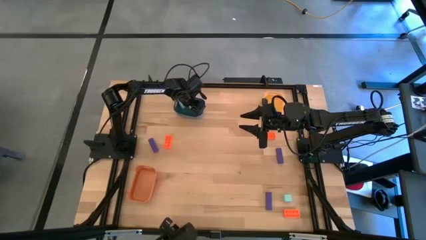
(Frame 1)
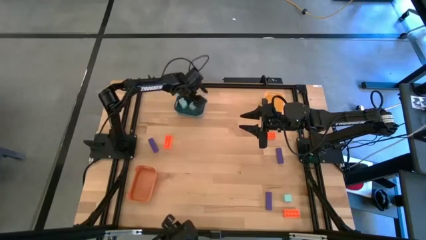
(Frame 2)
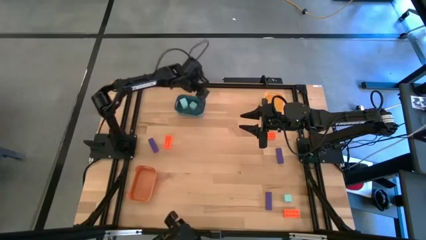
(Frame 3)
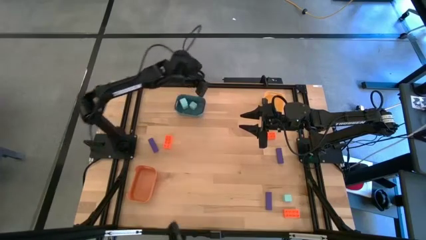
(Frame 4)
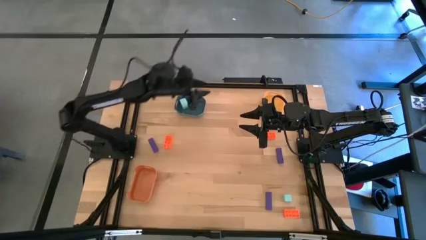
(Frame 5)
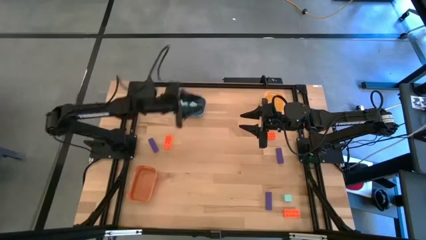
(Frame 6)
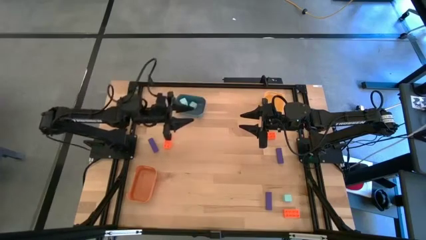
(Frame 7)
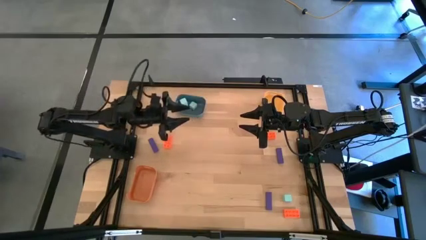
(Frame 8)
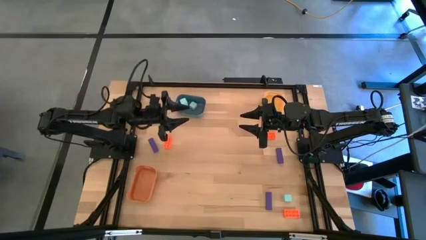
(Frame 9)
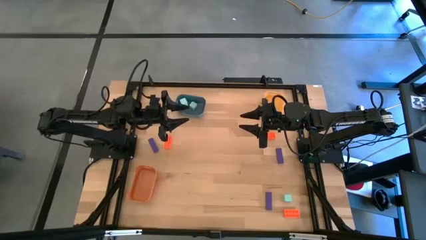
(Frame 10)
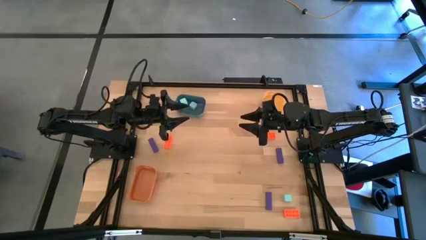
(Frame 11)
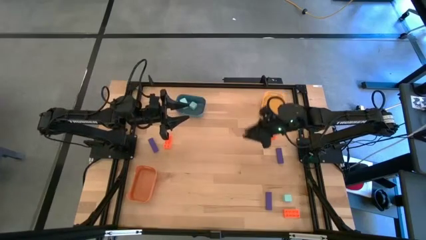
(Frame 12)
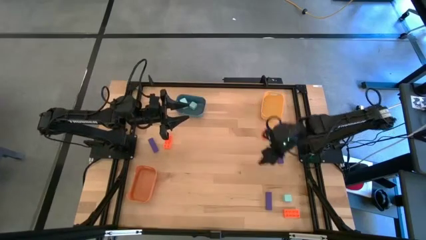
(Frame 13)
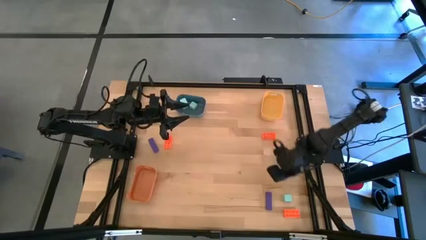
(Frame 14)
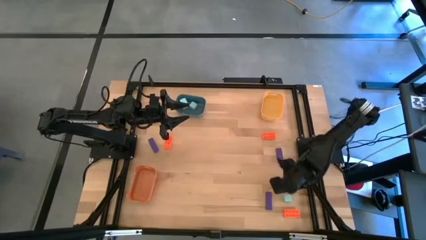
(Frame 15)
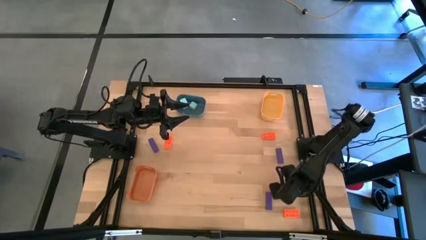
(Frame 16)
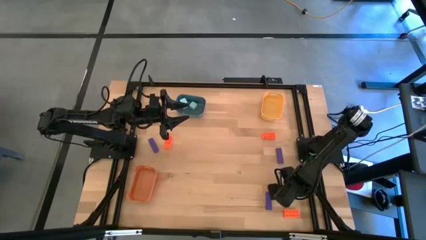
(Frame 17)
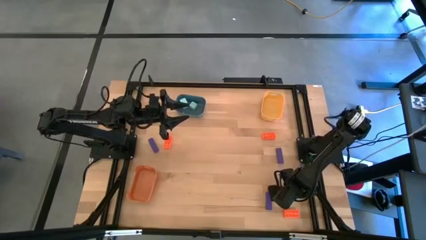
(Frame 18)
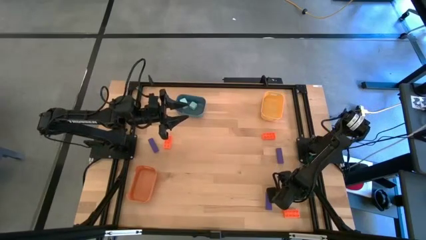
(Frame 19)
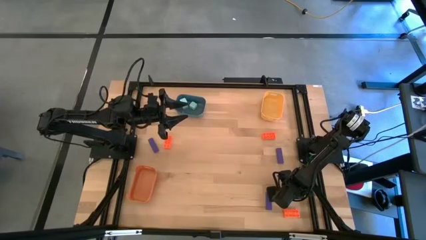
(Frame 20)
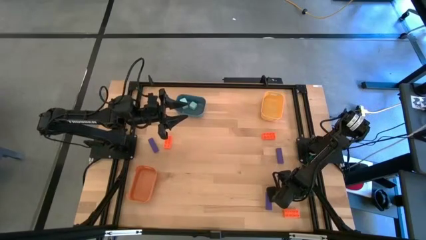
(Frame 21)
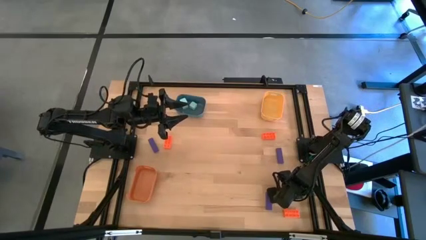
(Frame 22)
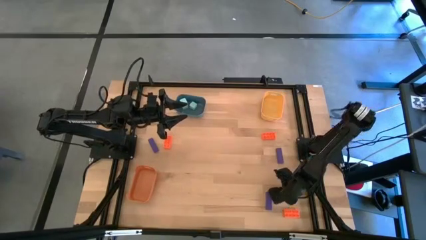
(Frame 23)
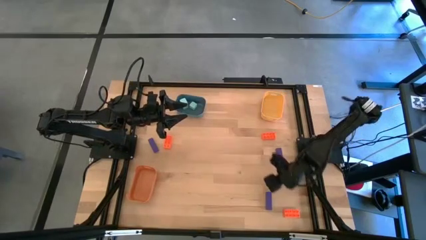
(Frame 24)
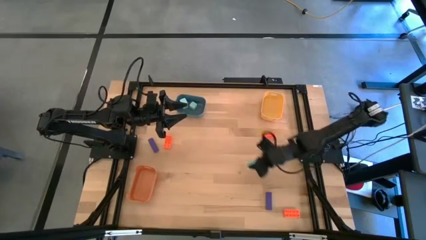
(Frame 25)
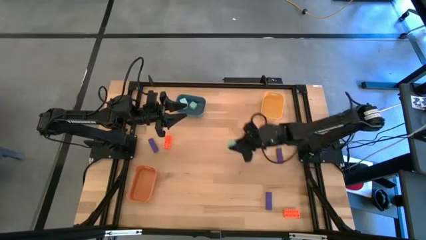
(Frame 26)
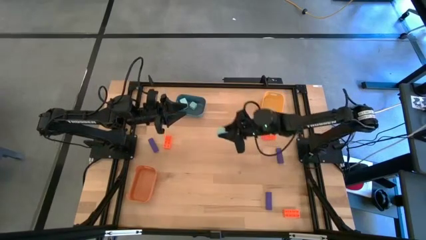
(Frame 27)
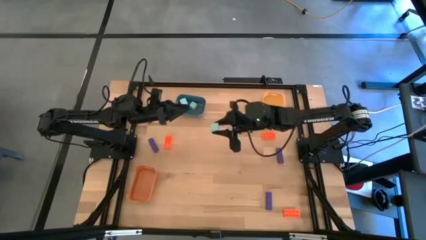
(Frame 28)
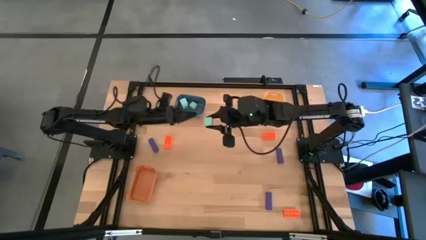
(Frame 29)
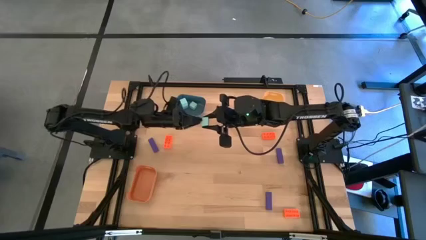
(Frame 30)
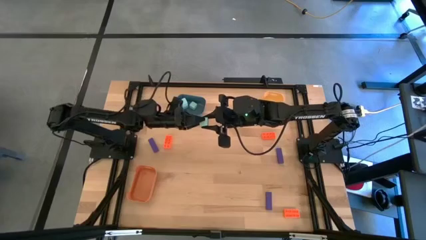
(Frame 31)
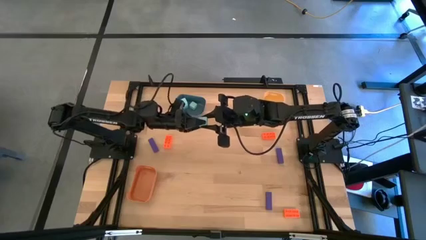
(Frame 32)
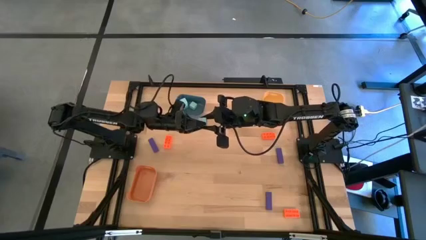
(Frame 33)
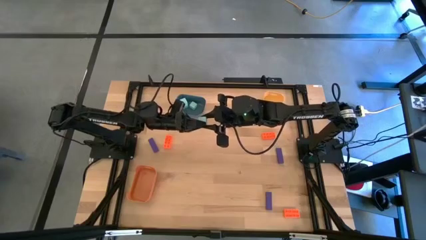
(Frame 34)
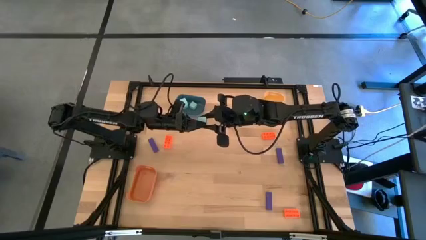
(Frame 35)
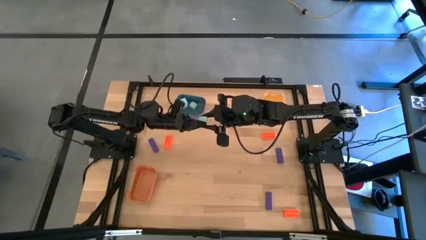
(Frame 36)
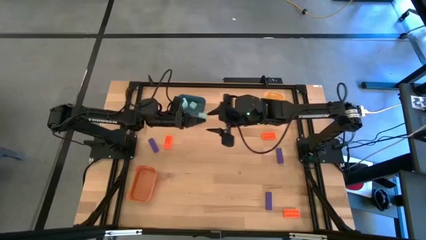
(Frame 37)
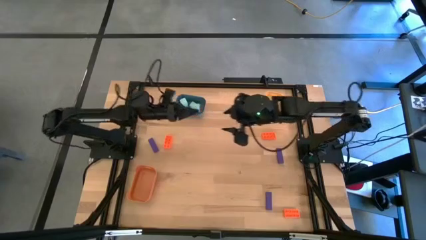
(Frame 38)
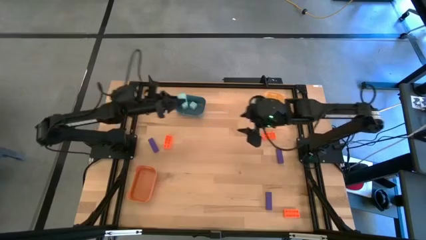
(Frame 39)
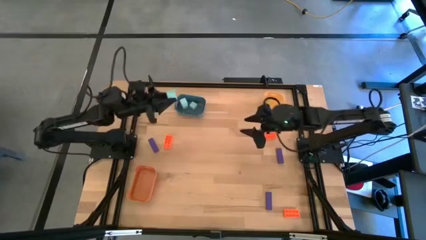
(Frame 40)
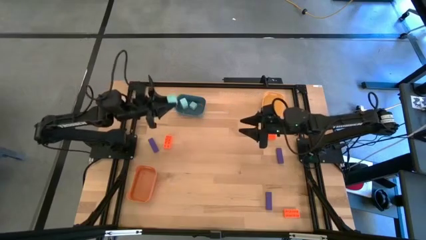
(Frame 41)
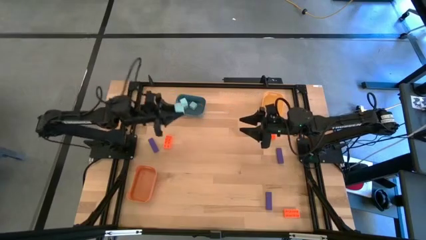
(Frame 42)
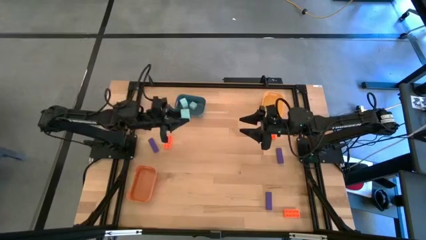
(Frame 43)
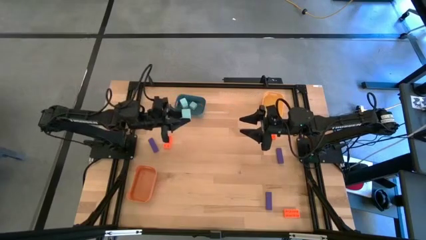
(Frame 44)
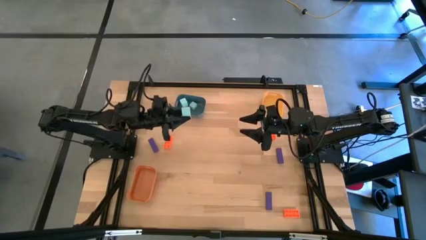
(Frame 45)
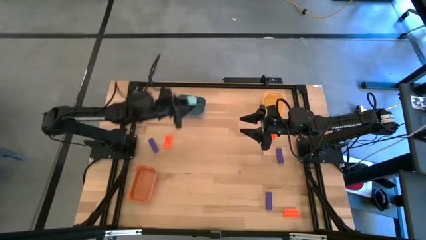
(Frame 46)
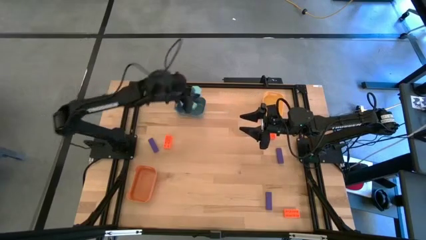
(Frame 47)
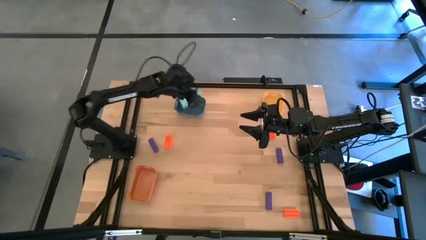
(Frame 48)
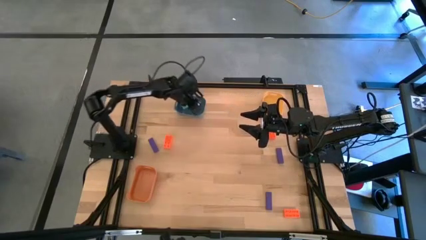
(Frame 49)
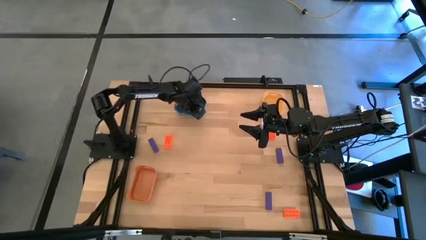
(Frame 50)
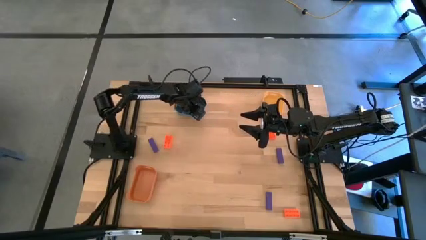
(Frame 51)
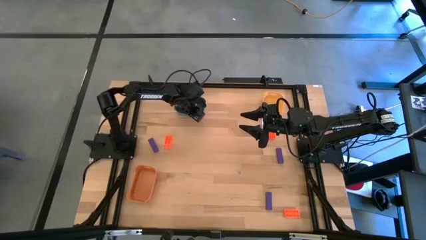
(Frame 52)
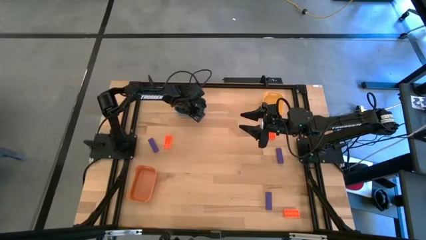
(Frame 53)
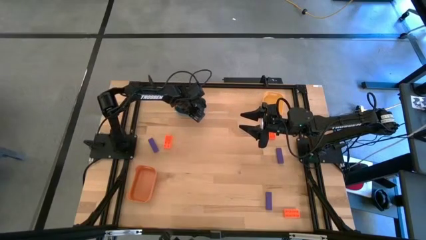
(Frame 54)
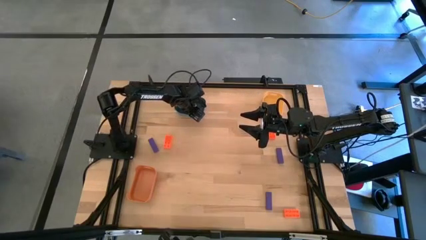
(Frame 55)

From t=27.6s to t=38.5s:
Task: Sort & place blocks by color
Put the sky blue block into the blue bin

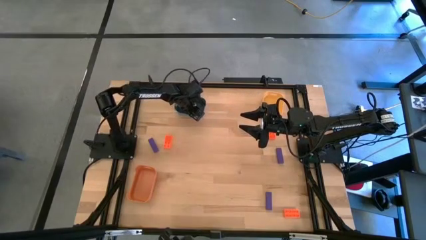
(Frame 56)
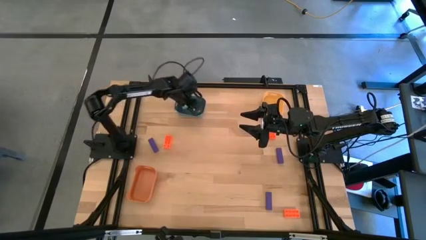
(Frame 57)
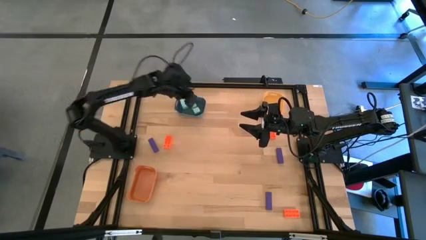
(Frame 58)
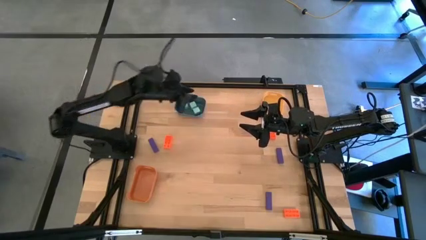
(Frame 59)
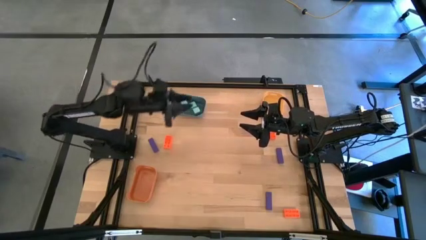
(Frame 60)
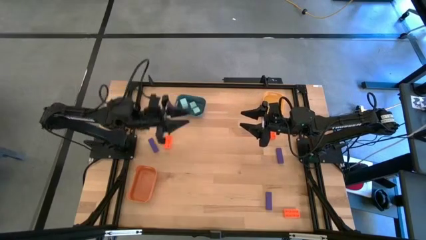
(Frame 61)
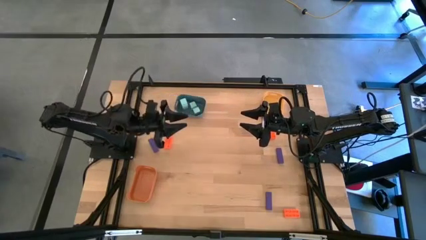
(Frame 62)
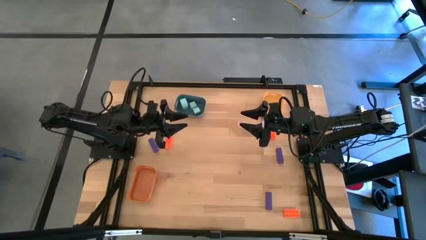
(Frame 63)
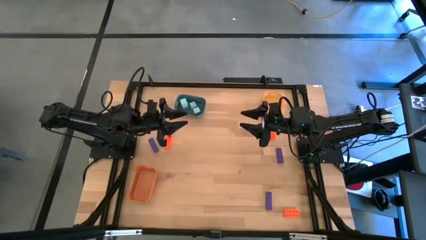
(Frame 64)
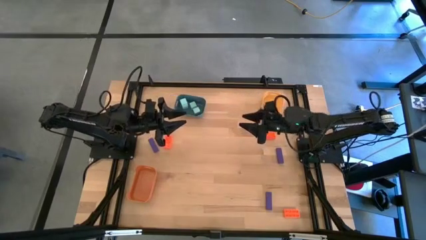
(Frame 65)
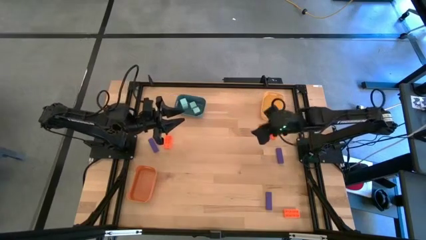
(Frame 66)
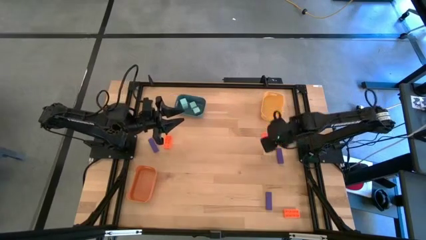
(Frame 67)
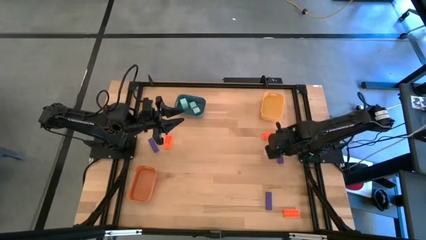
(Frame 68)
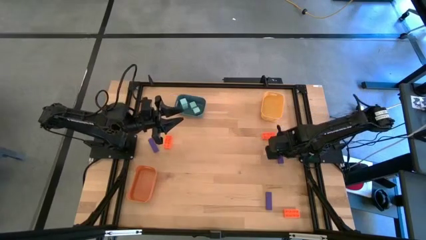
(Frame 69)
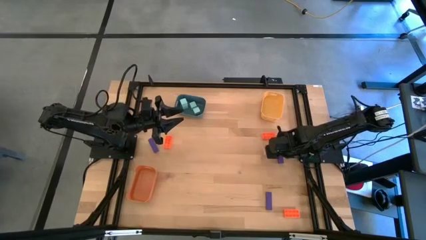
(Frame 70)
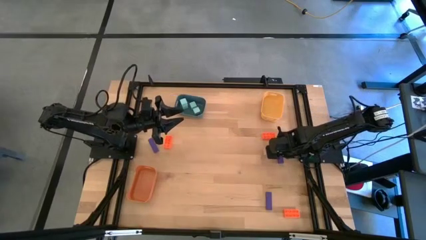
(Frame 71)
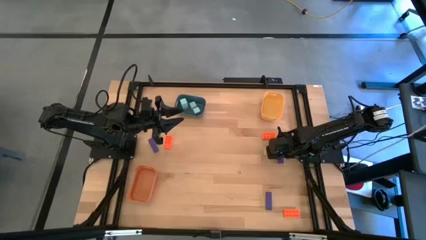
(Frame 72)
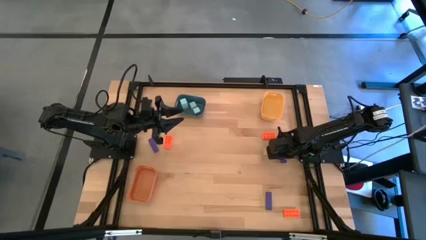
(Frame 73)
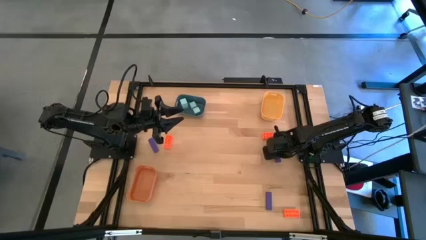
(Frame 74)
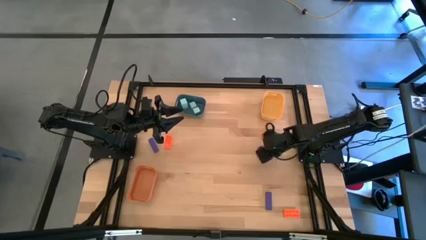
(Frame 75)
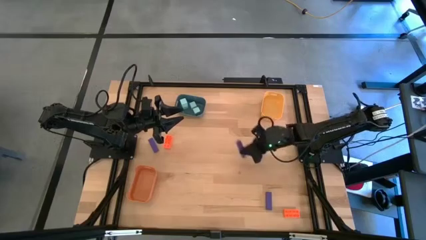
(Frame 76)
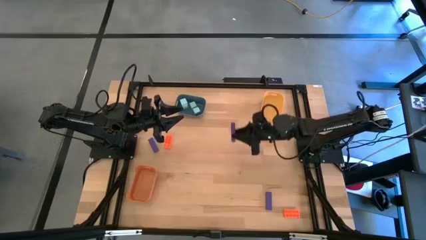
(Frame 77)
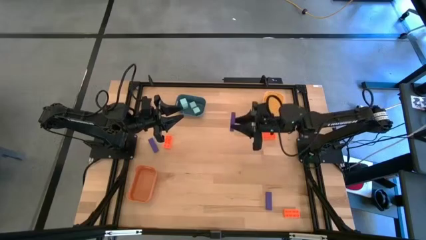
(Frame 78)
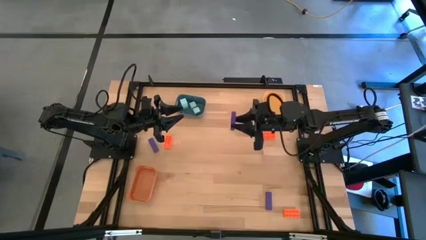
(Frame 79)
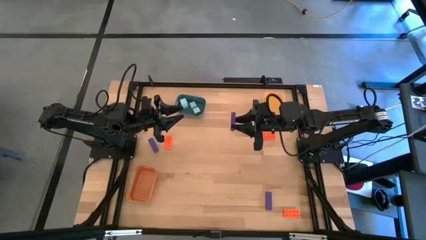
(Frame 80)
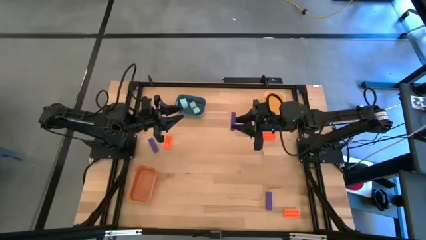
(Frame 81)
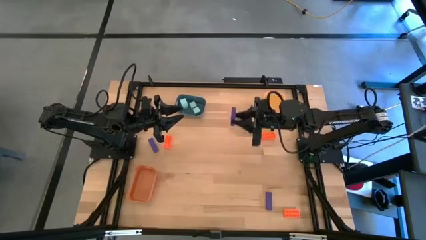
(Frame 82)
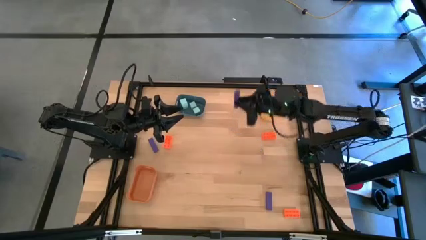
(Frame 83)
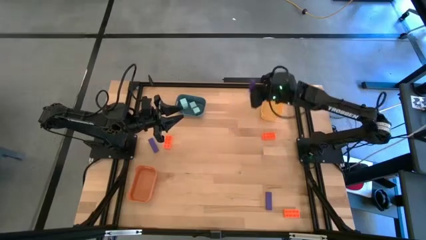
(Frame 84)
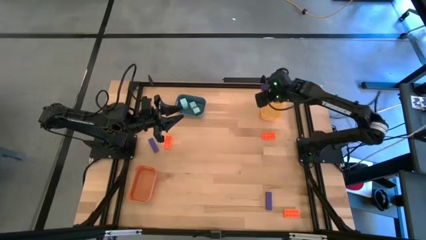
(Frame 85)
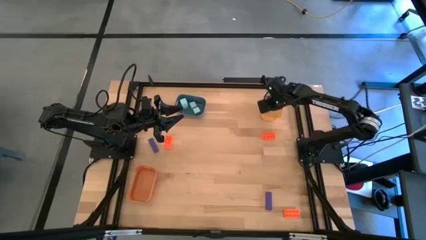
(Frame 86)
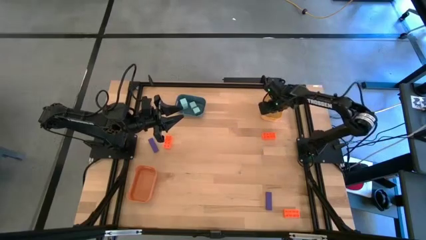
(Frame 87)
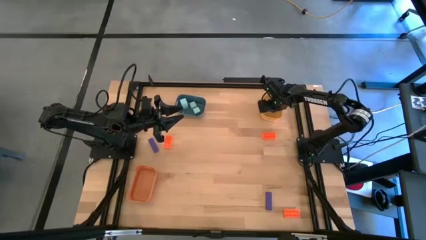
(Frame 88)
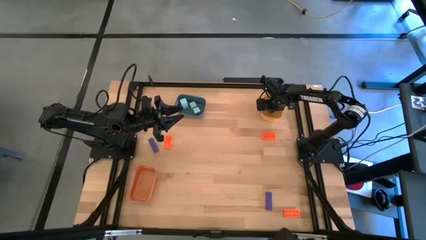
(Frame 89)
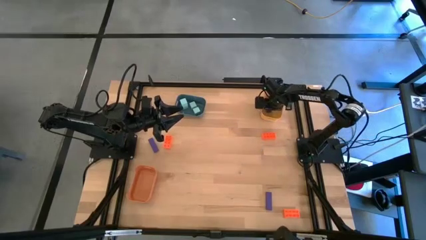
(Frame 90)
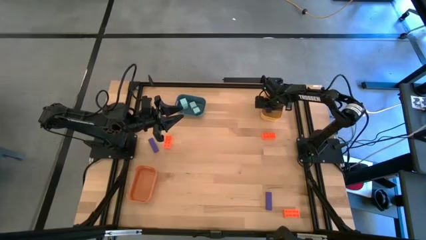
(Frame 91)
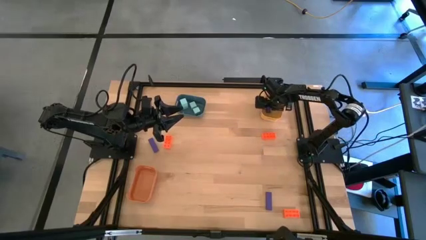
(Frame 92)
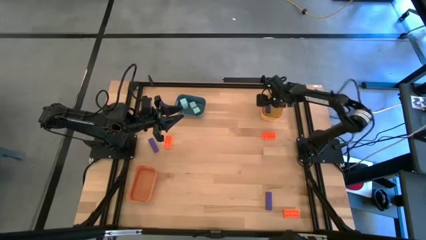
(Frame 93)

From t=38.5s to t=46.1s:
Put the top right purple rectangle block into the yellow bin
